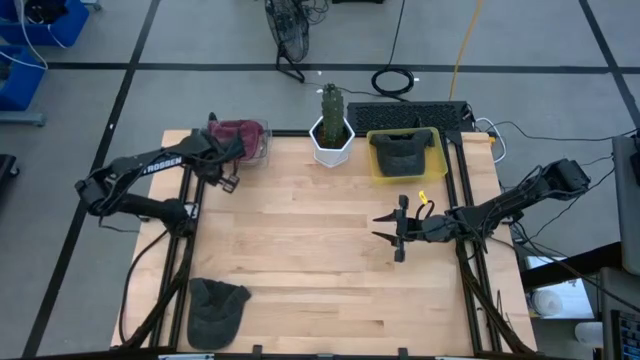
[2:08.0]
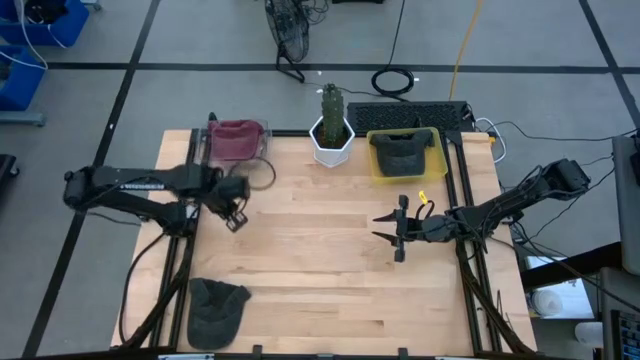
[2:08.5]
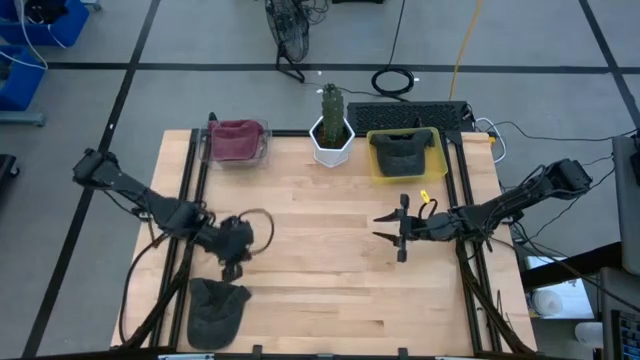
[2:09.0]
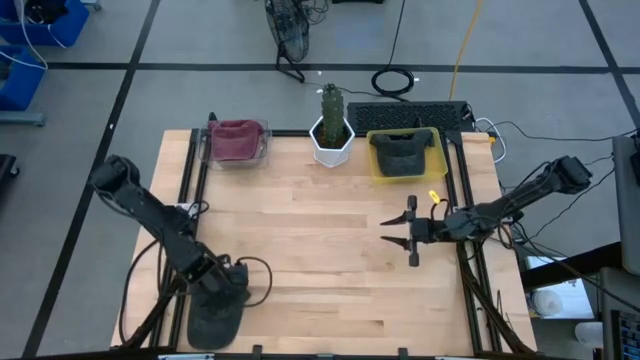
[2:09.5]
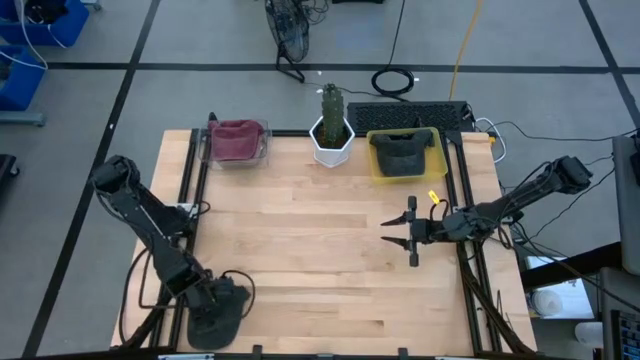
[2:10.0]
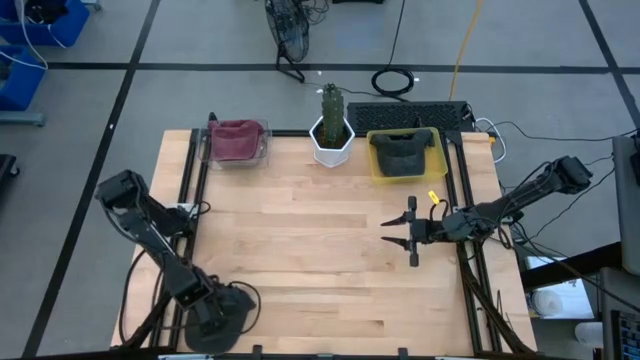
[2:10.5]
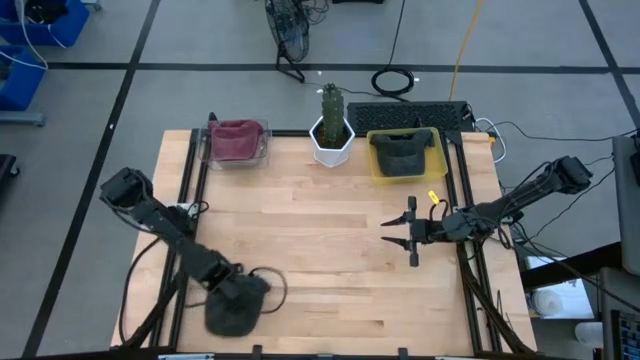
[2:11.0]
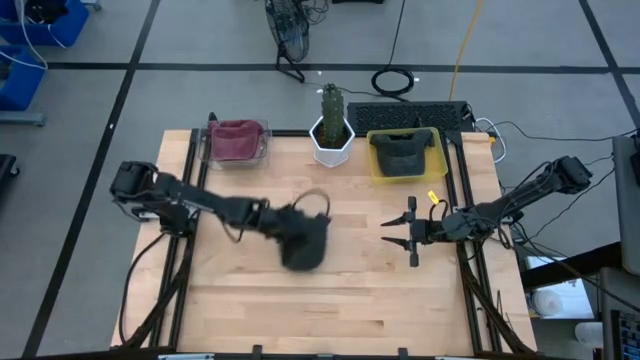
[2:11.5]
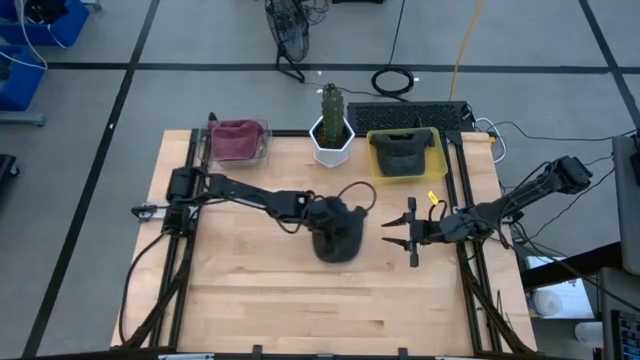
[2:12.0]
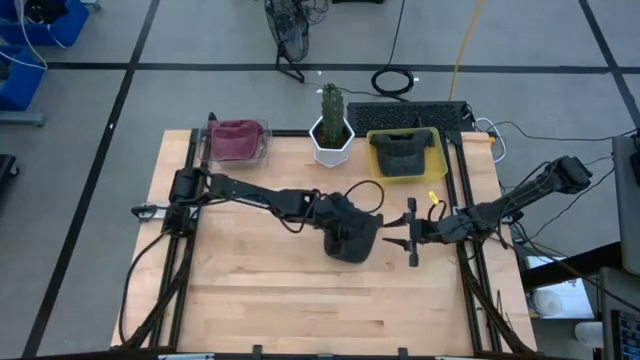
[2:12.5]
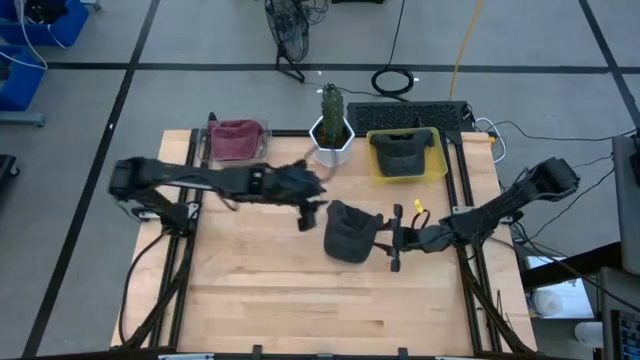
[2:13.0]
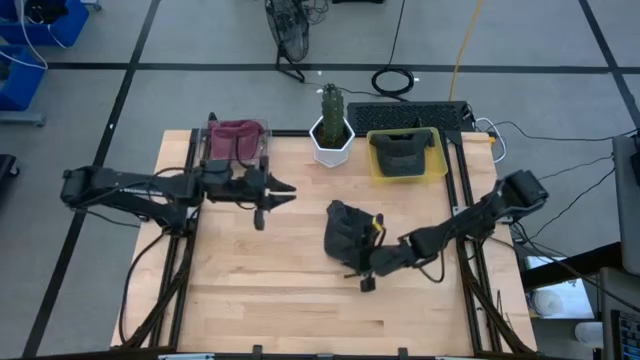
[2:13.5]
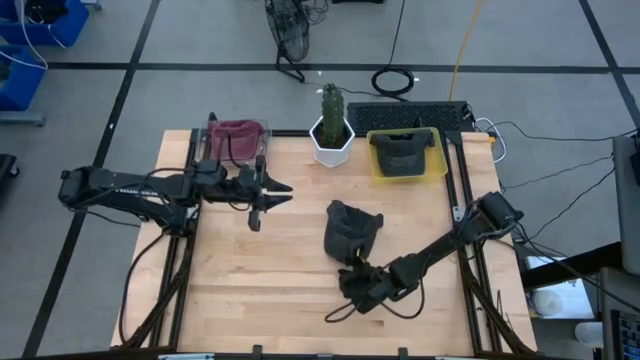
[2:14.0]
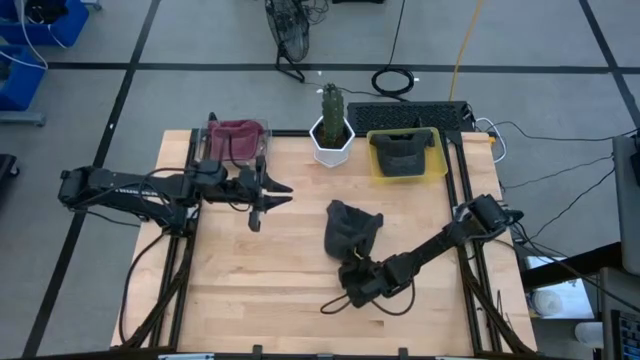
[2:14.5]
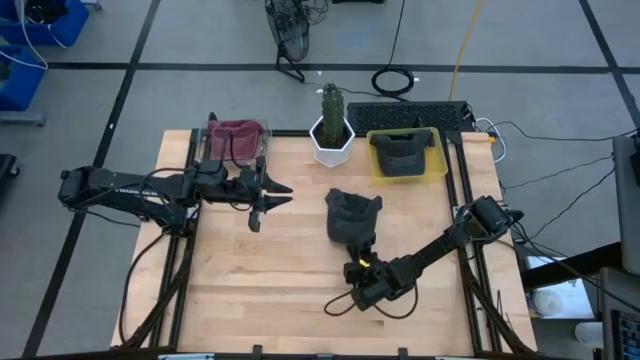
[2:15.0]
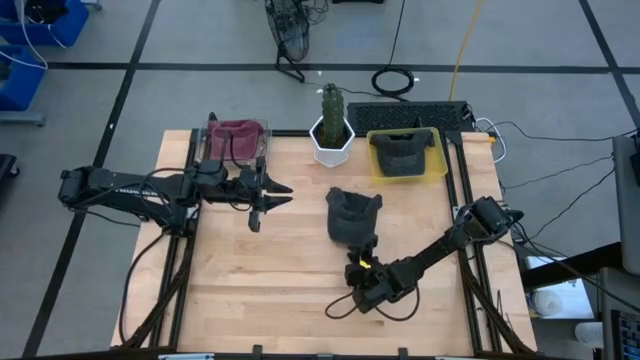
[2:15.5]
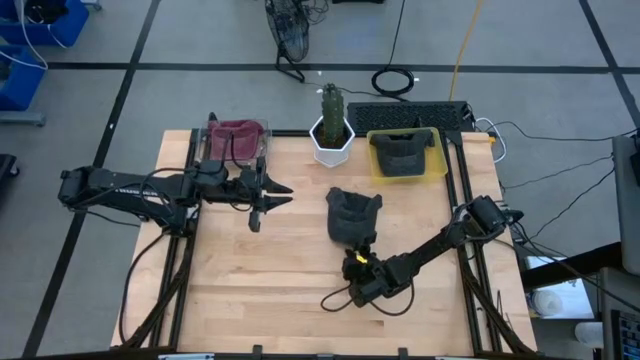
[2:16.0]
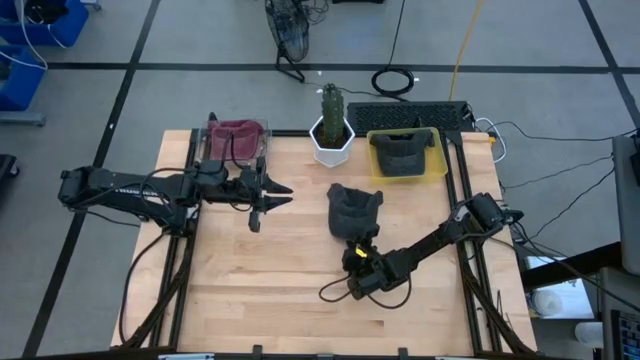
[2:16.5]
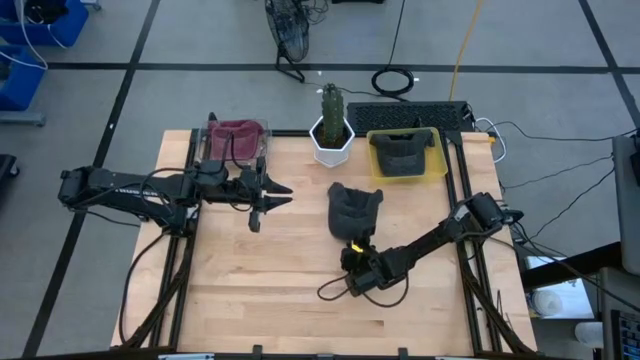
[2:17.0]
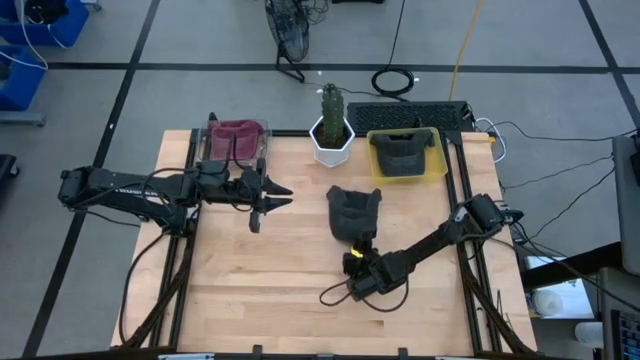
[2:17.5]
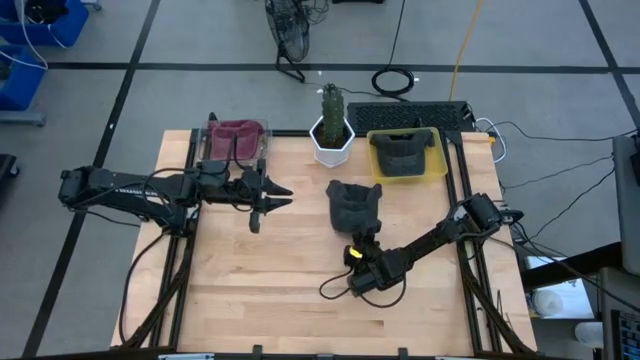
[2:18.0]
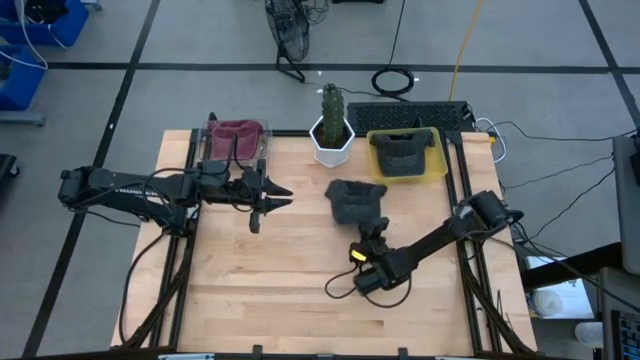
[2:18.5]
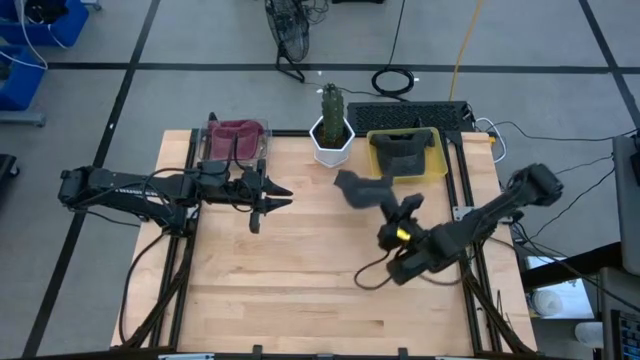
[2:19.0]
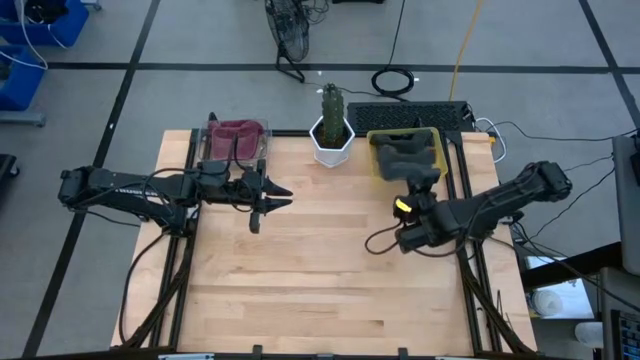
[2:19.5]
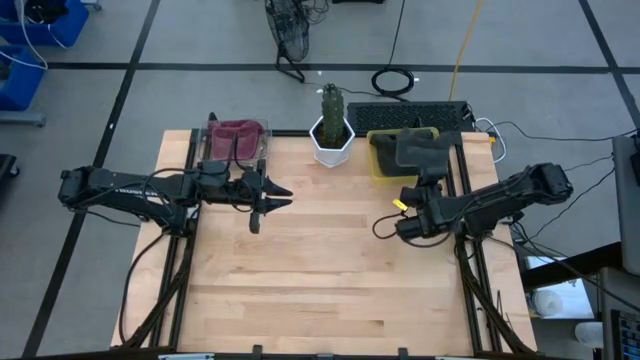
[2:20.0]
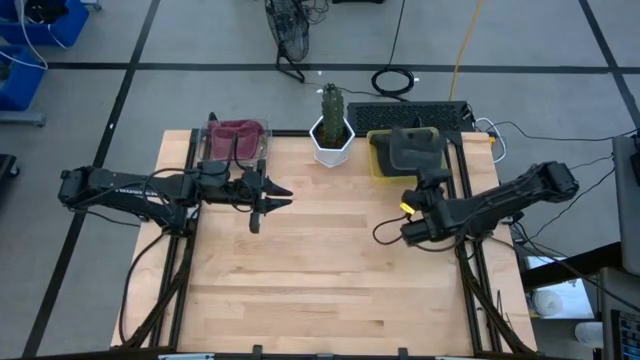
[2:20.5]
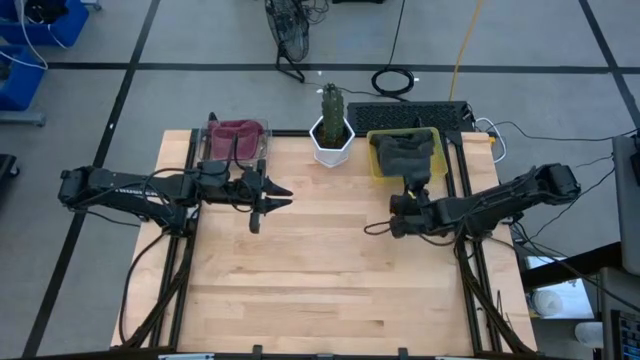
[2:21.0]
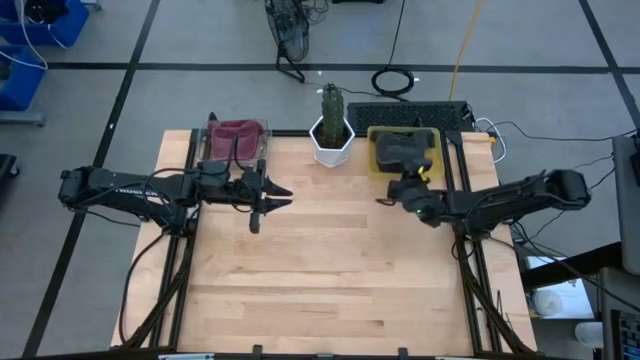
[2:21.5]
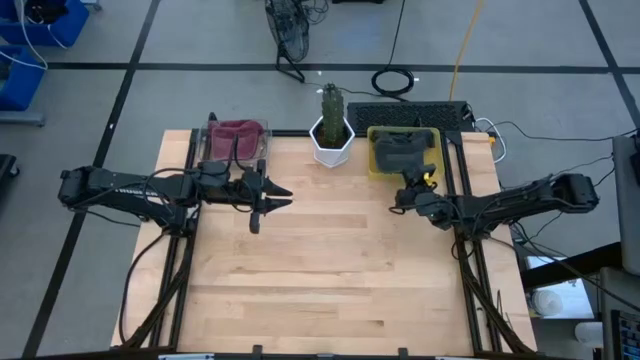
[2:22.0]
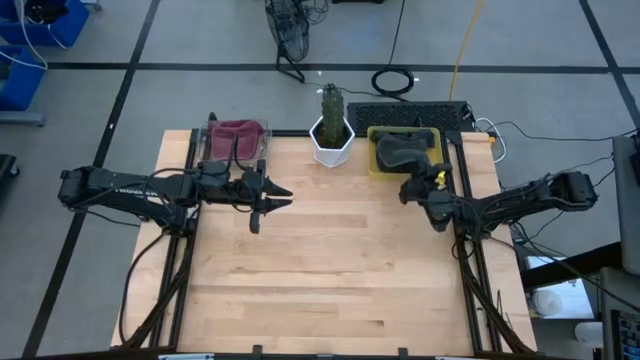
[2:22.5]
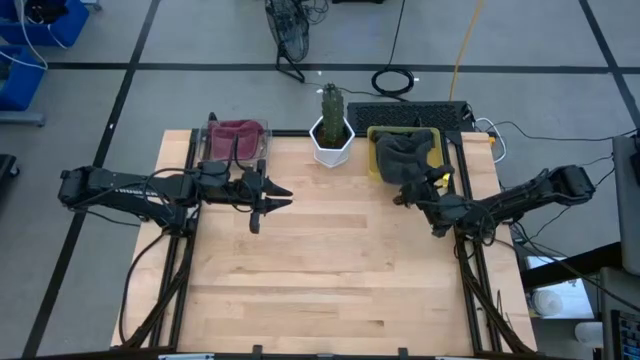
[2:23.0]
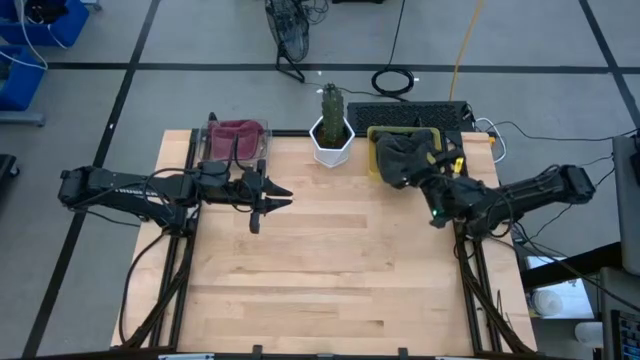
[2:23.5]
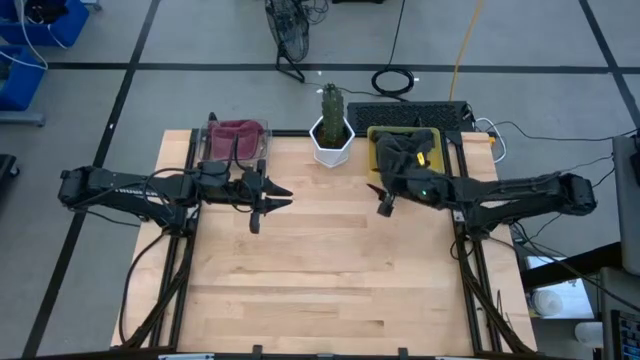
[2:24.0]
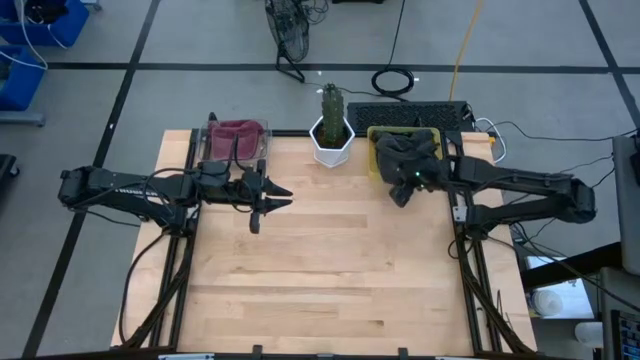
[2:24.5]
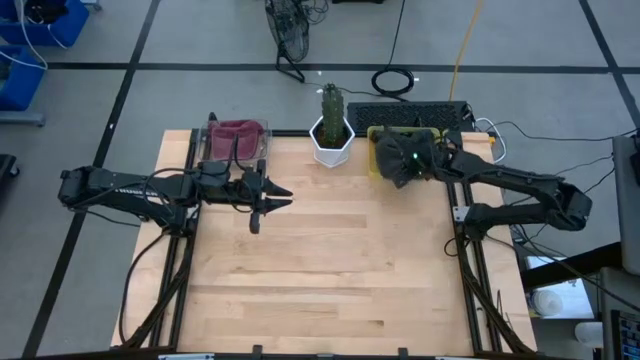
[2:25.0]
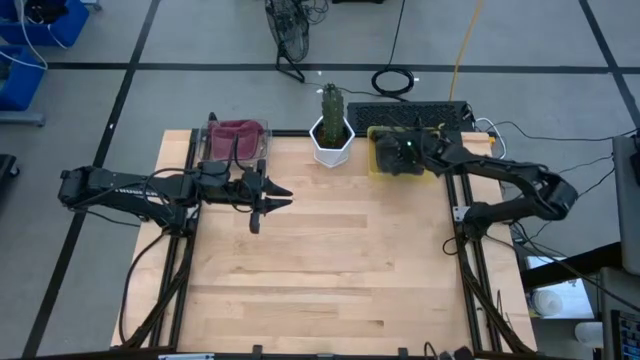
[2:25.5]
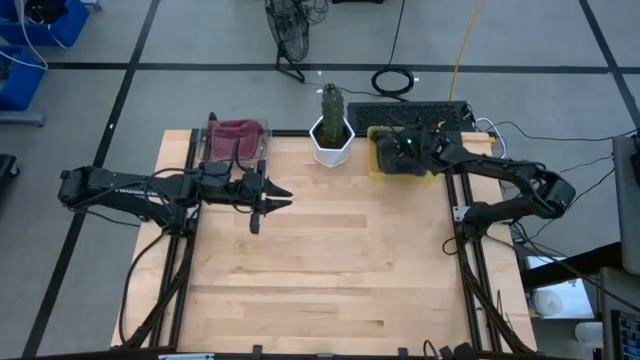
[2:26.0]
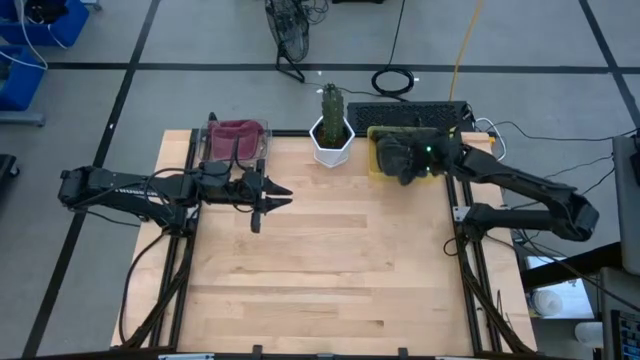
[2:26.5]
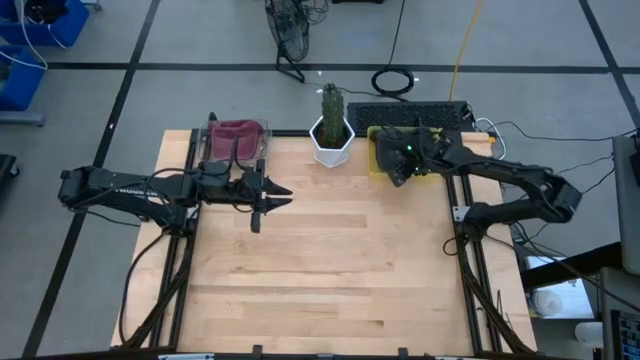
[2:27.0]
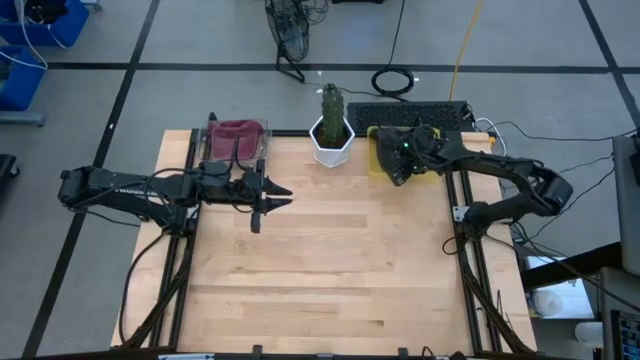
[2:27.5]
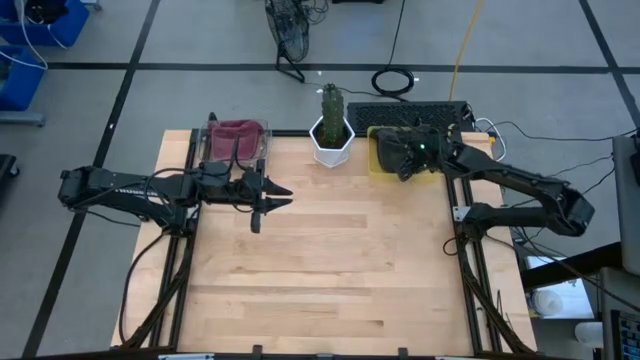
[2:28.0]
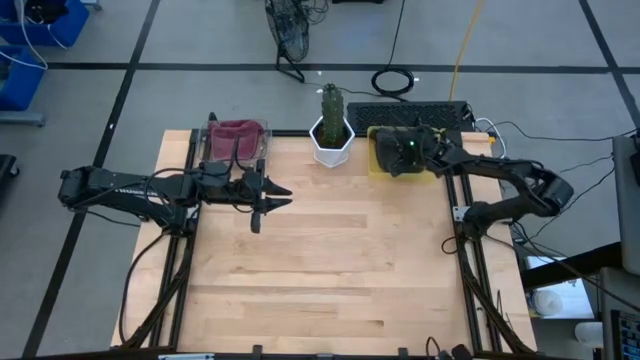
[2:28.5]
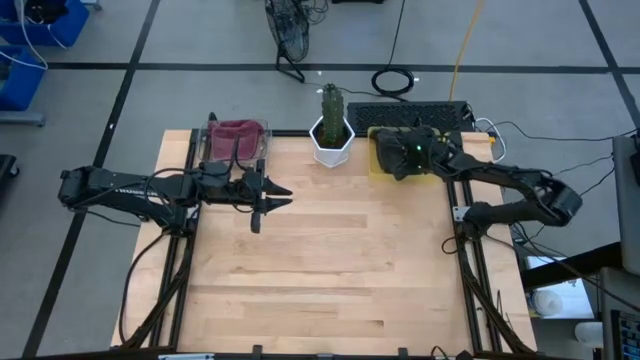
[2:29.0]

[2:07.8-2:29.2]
Task: Pick & Place hat
Put the black cap into the yellow bin
